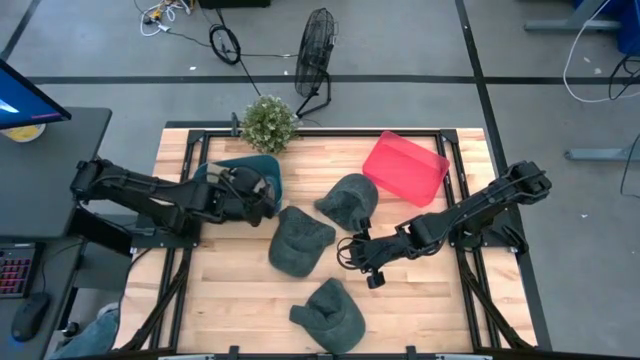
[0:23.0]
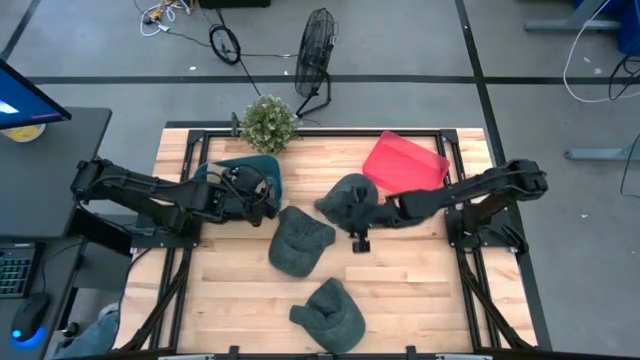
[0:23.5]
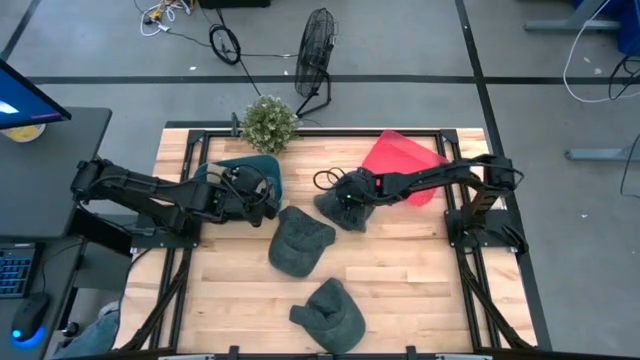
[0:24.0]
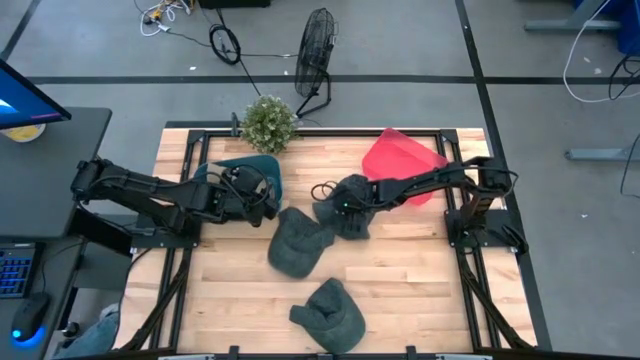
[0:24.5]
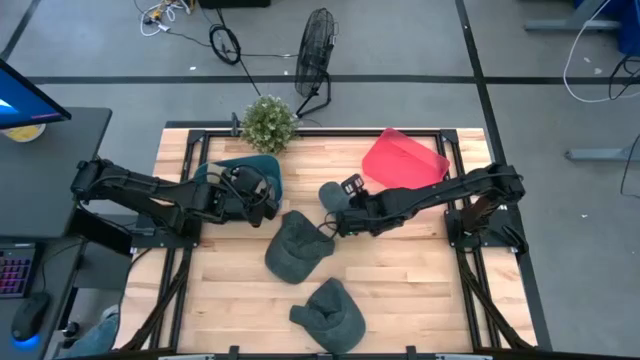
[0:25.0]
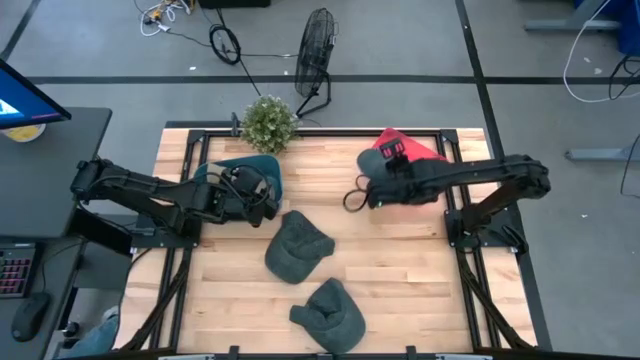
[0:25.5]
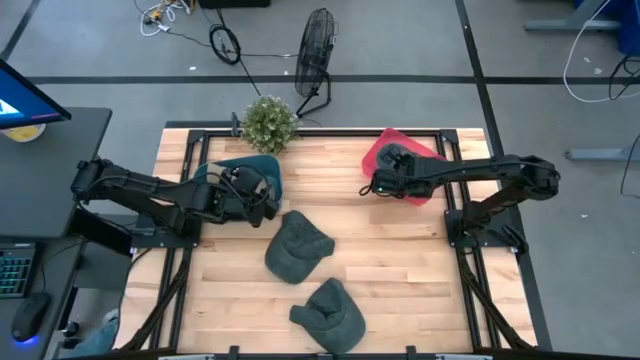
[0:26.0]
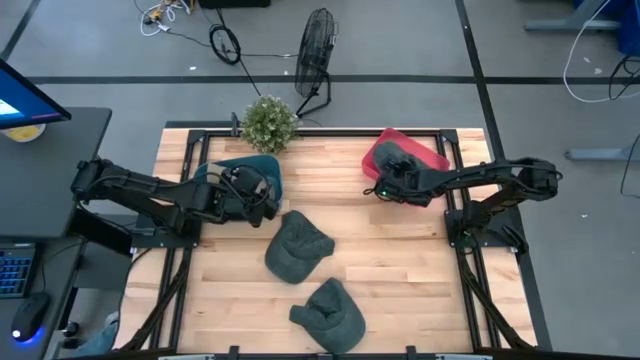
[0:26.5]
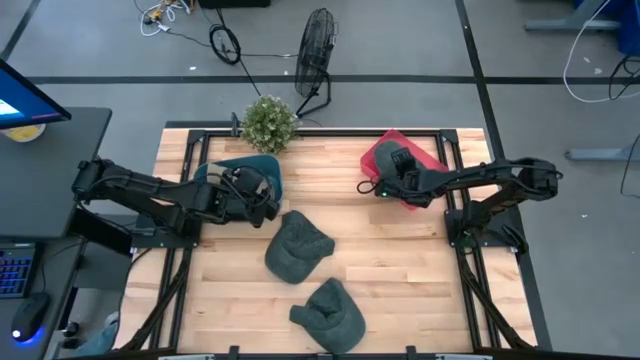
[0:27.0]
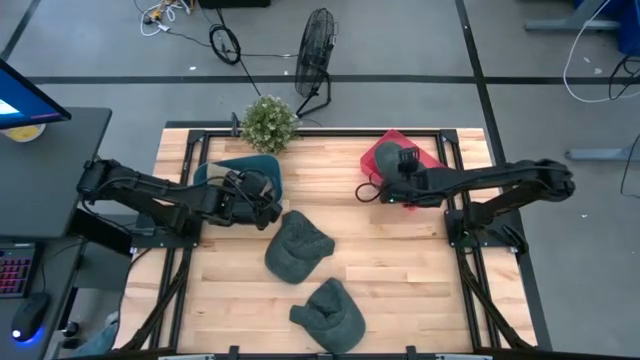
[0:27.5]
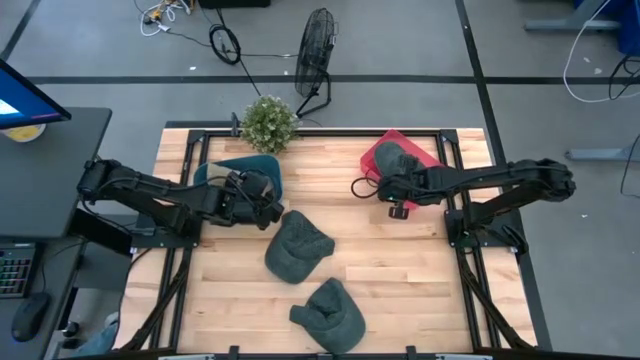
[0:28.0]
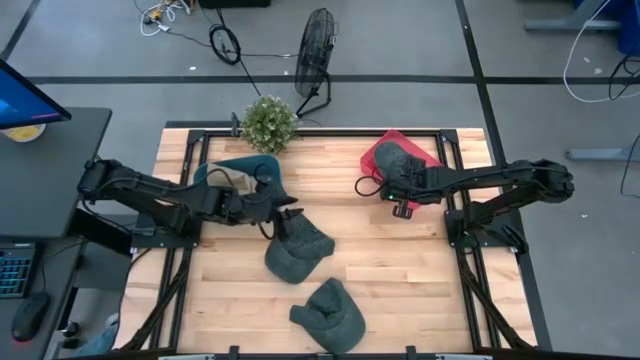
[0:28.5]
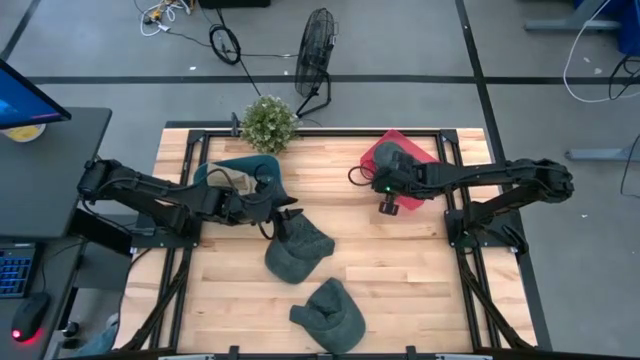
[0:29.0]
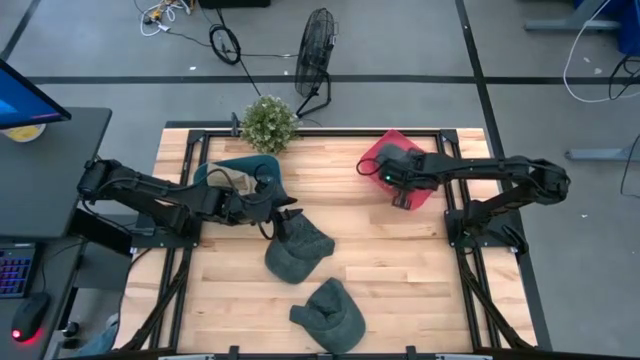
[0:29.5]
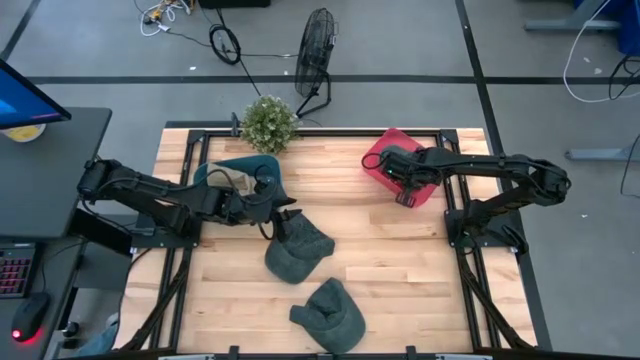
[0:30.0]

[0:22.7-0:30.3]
Task: Pick & Place hat
Put the top blue cap into the pink bin

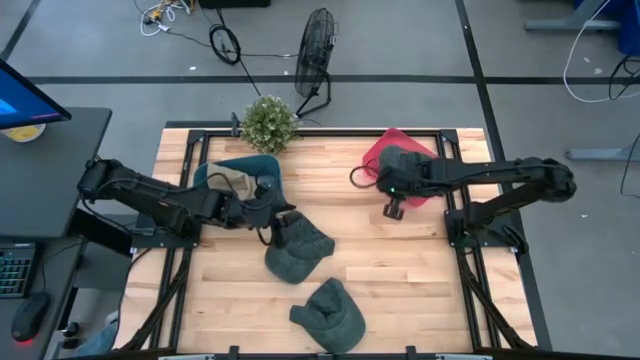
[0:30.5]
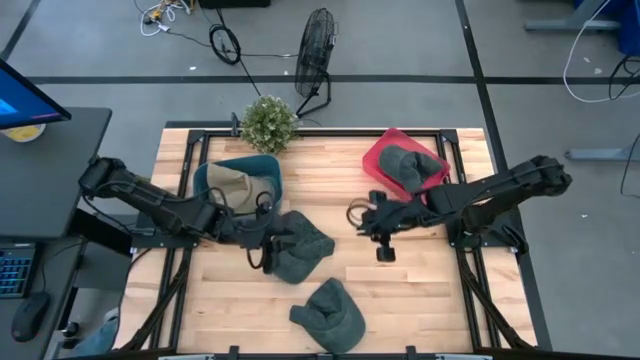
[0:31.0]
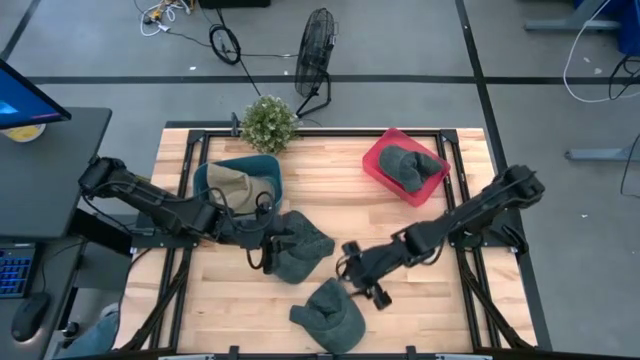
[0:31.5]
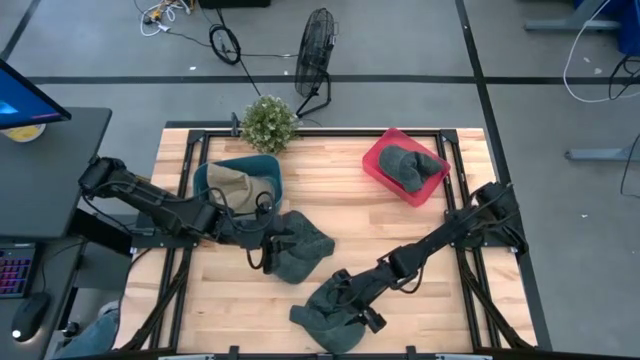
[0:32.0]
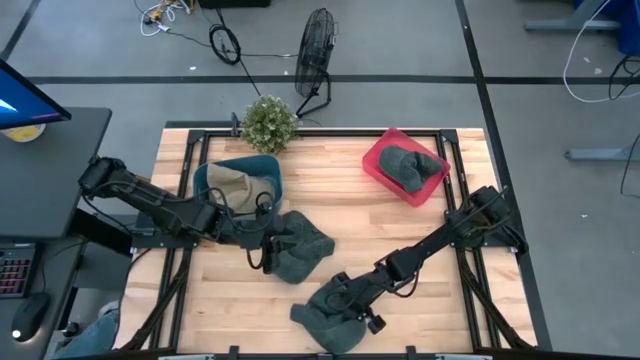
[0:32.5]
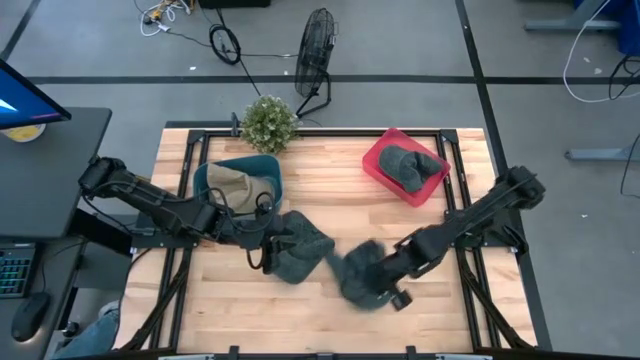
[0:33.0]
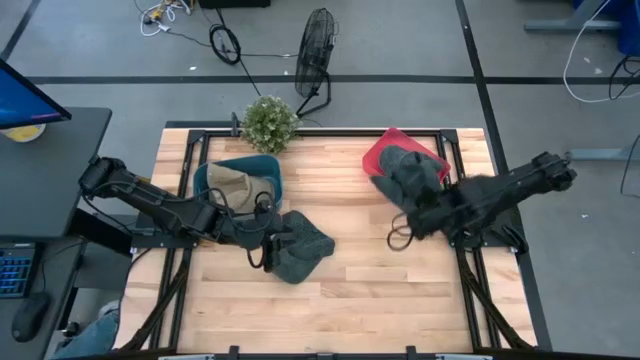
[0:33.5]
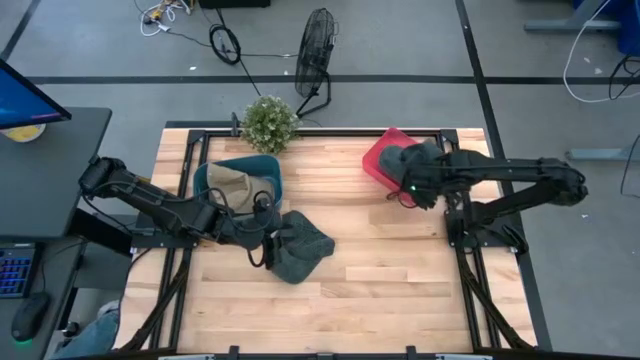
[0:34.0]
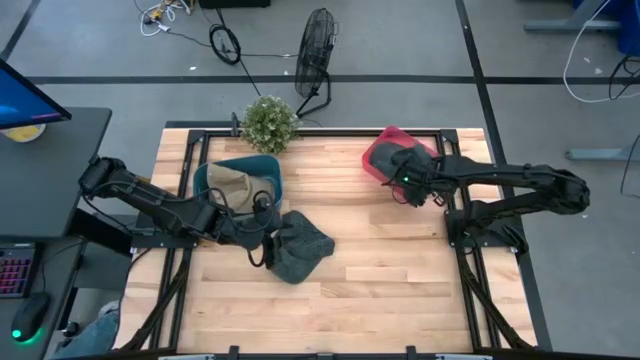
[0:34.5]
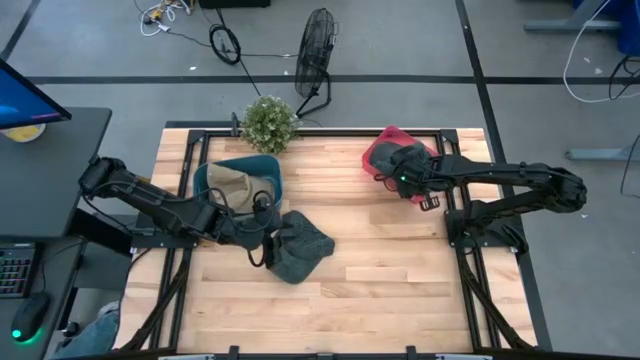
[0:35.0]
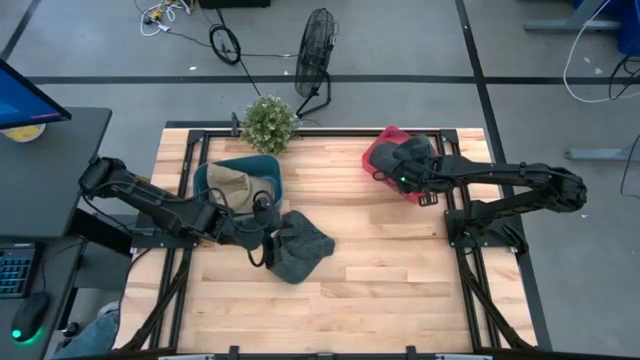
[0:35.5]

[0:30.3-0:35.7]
Put the bottom blue cap into the pink bin

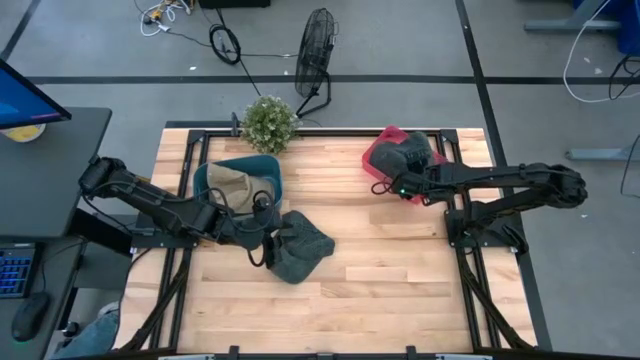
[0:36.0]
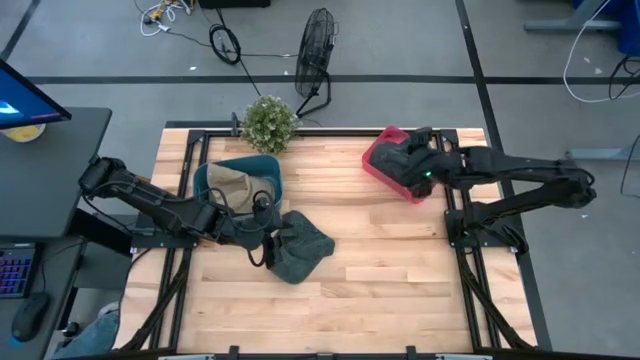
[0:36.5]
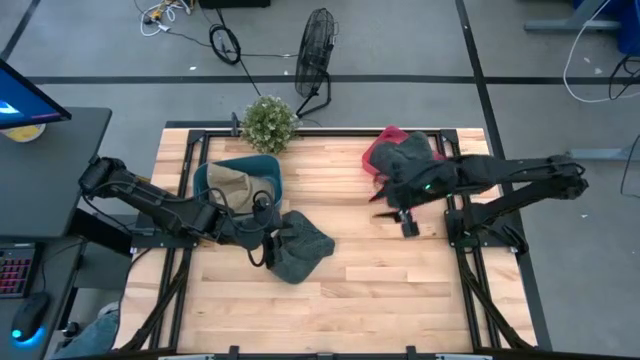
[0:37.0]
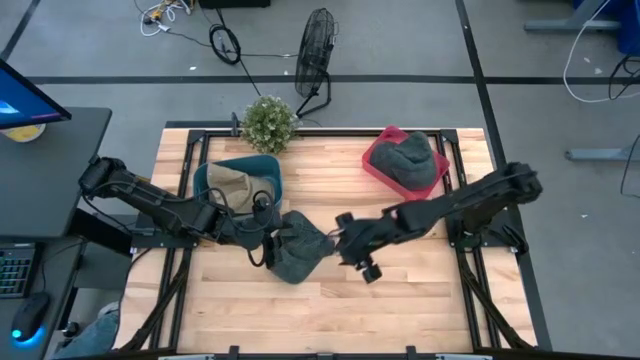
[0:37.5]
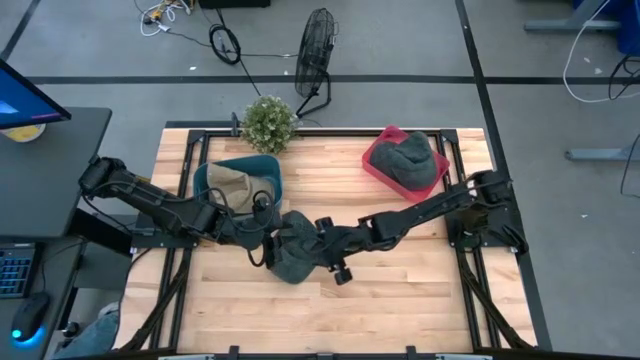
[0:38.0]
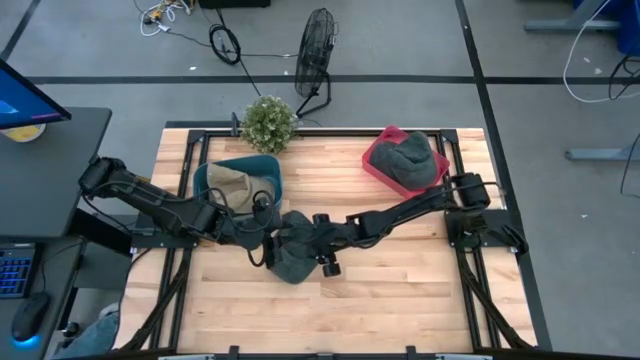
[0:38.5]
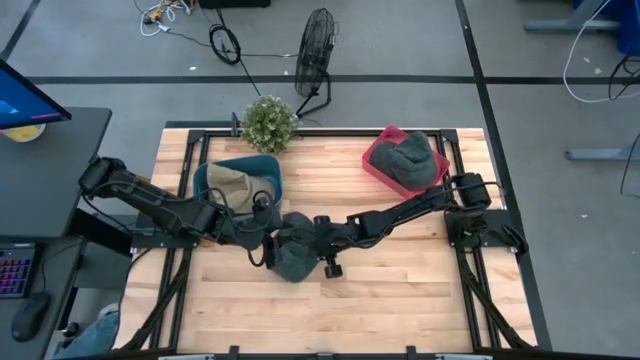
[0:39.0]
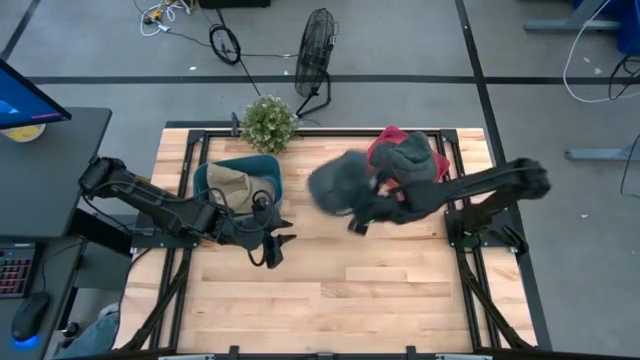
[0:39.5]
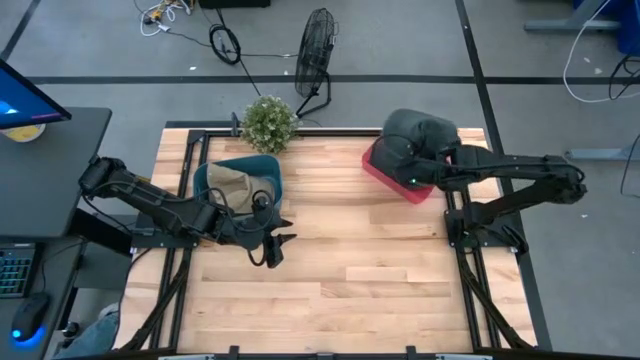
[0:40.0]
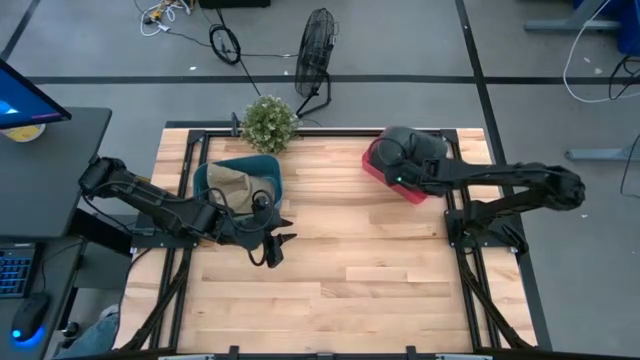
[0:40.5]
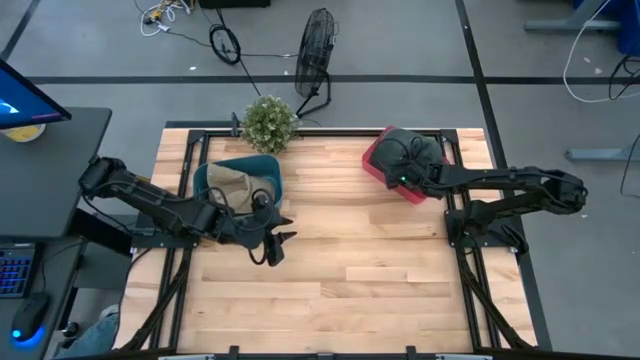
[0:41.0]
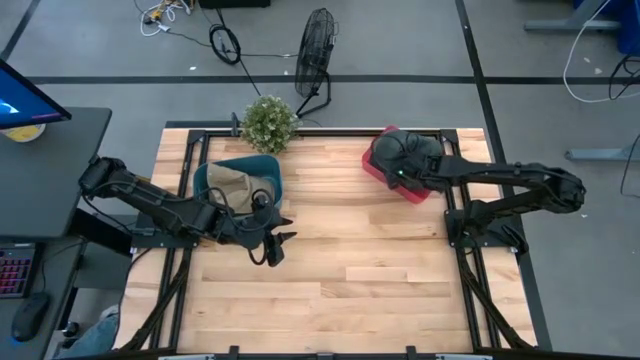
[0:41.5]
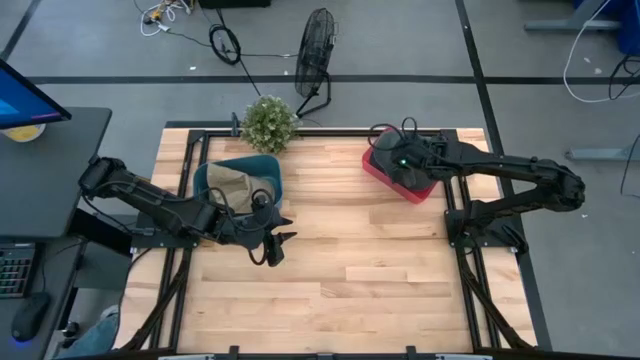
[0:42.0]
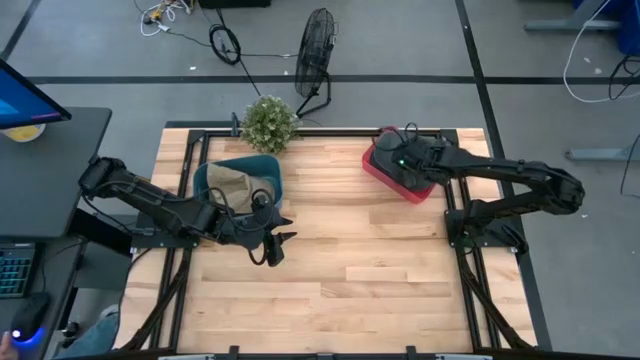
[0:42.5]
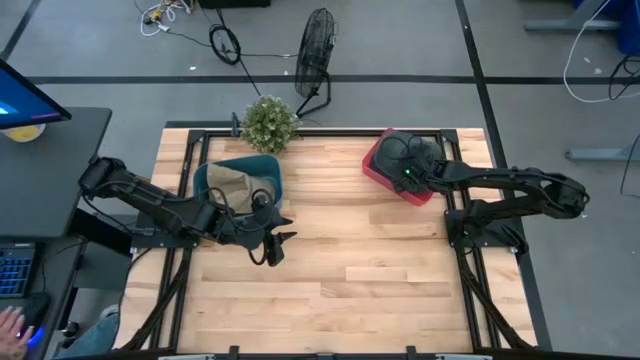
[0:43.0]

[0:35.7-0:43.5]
Put the blue cap into the pink bin

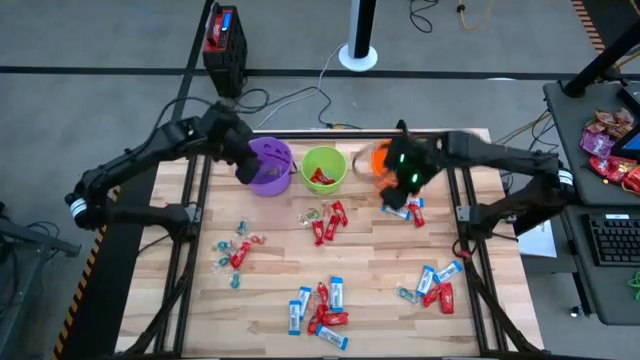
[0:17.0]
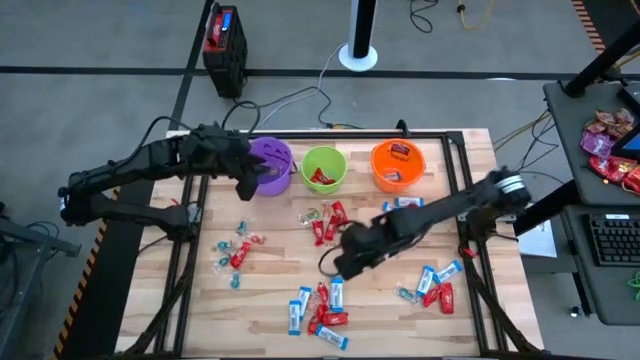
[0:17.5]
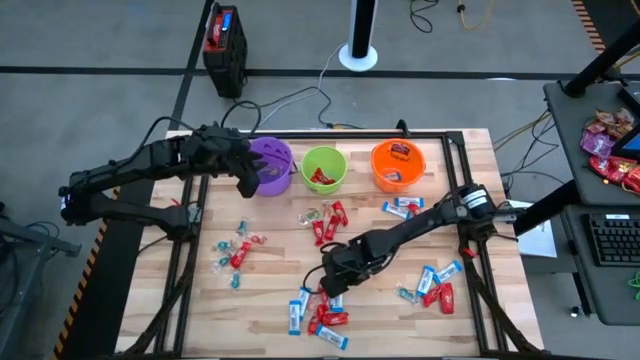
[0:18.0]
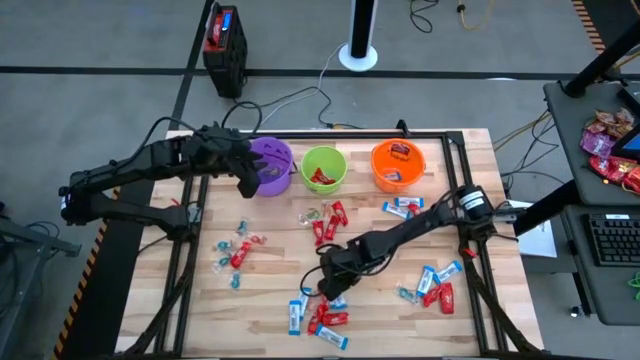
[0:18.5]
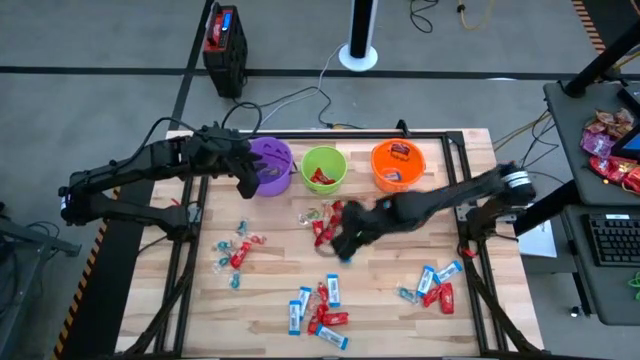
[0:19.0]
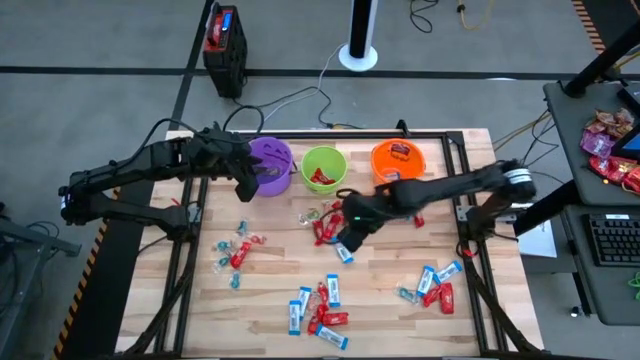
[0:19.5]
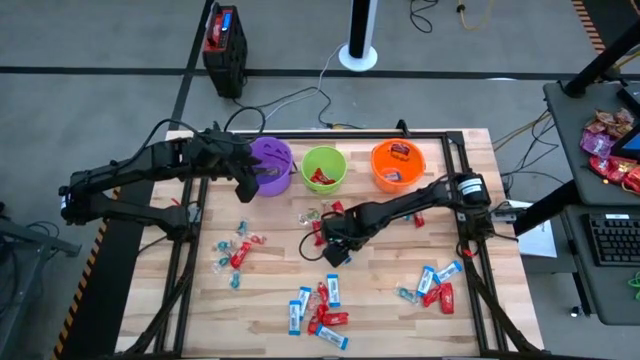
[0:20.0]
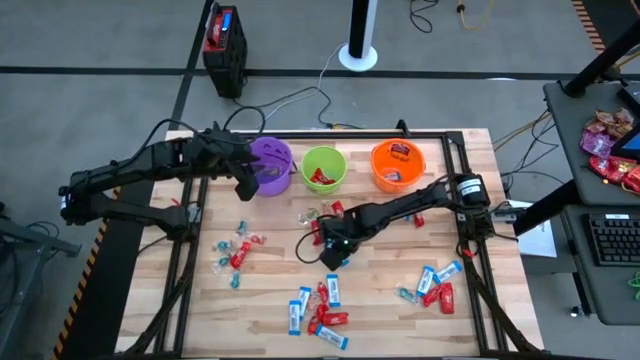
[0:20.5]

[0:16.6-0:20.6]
Task: Sort candy by brand, put in halloween buckets
Put the white chocolate bar into the orange bucket
